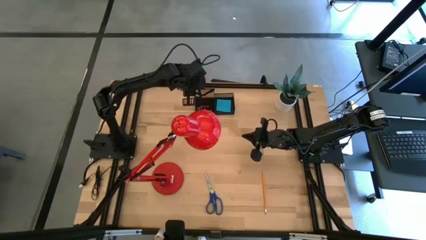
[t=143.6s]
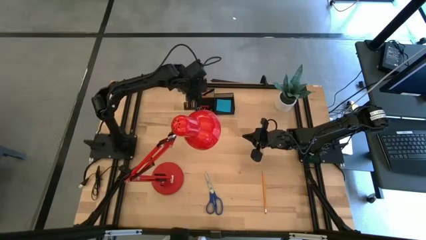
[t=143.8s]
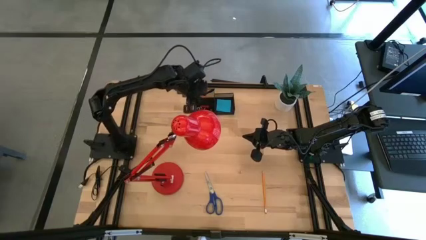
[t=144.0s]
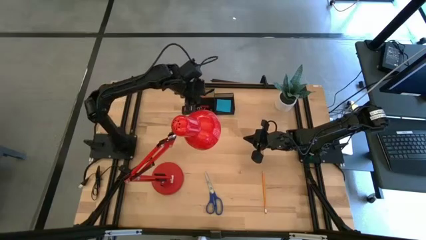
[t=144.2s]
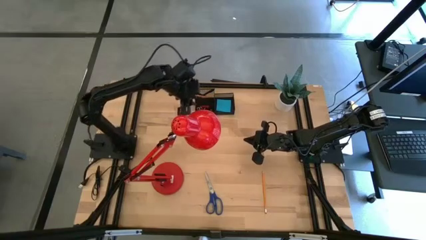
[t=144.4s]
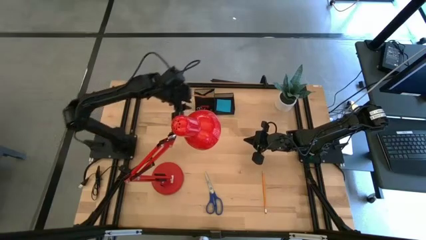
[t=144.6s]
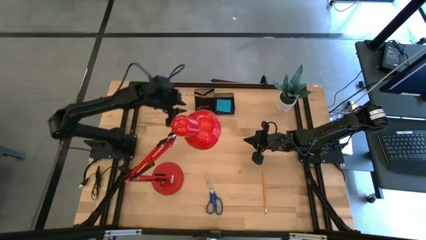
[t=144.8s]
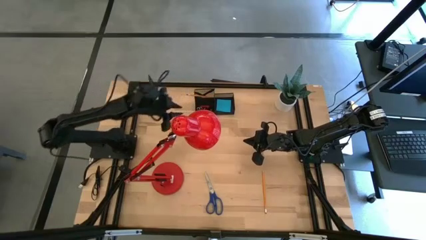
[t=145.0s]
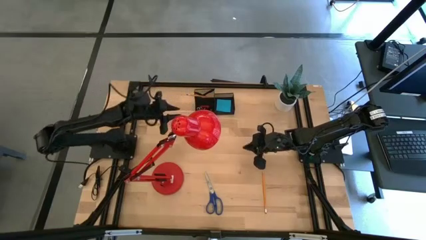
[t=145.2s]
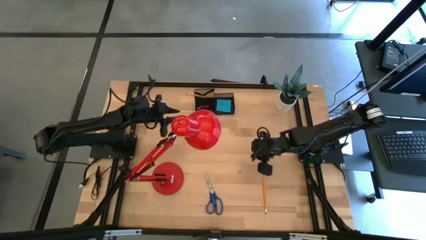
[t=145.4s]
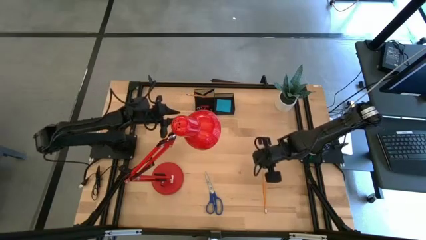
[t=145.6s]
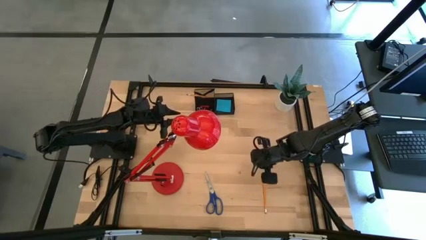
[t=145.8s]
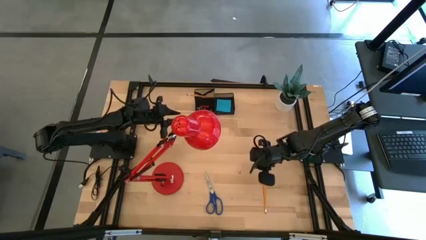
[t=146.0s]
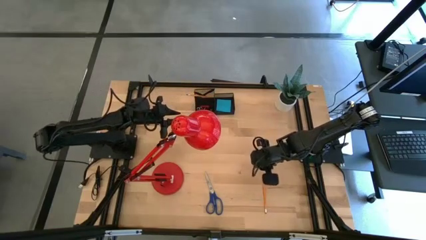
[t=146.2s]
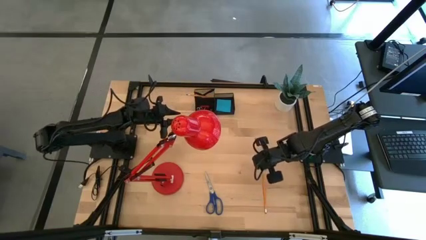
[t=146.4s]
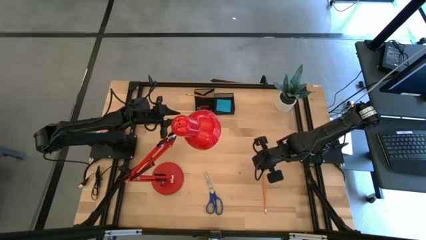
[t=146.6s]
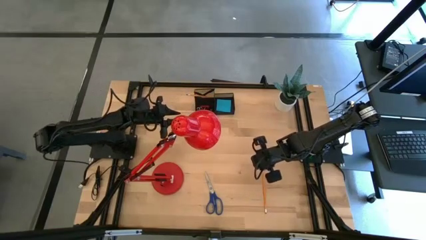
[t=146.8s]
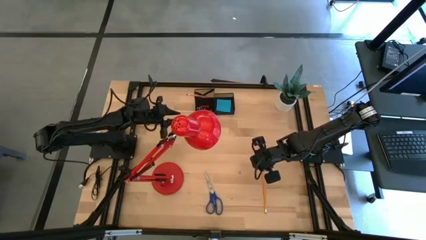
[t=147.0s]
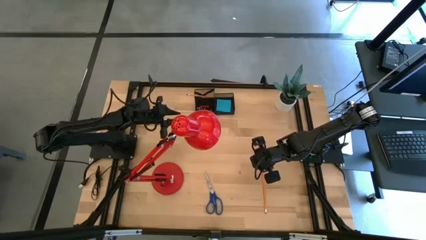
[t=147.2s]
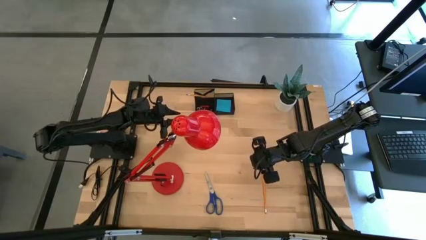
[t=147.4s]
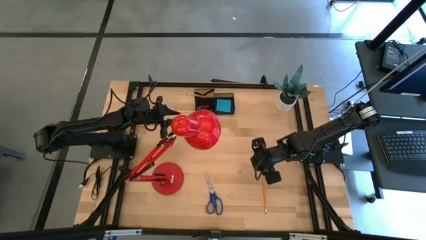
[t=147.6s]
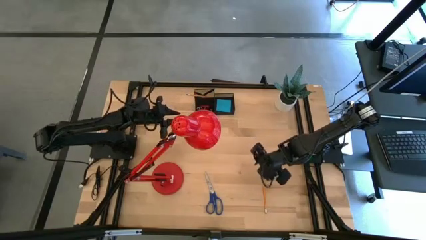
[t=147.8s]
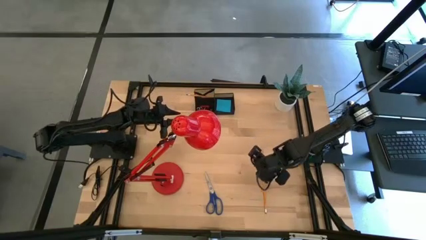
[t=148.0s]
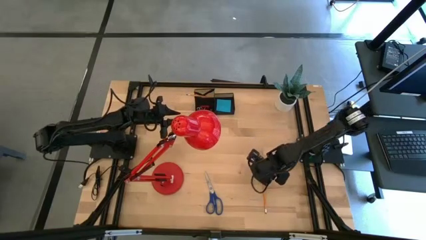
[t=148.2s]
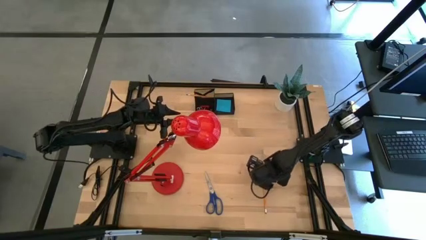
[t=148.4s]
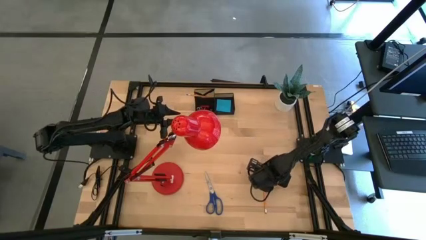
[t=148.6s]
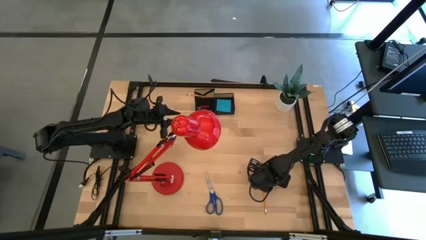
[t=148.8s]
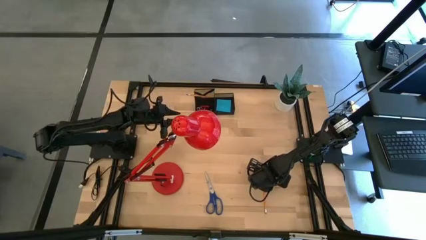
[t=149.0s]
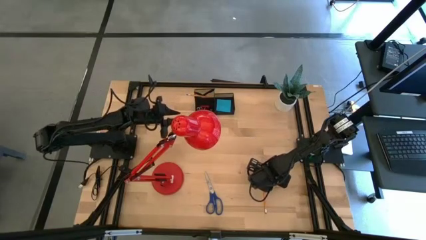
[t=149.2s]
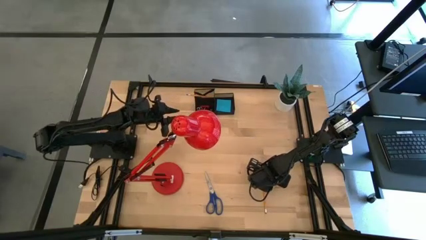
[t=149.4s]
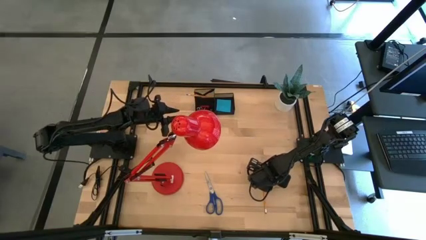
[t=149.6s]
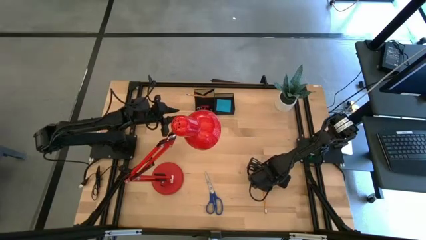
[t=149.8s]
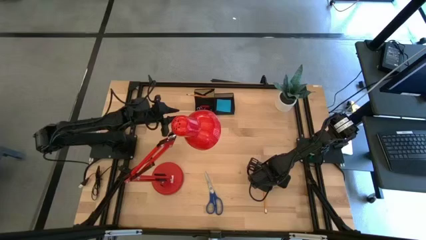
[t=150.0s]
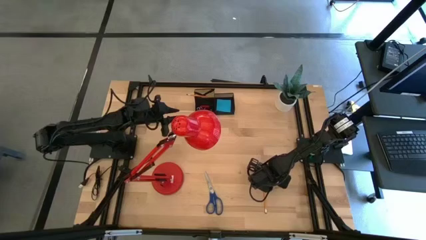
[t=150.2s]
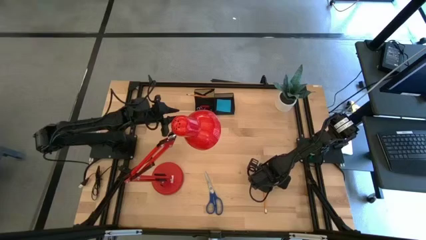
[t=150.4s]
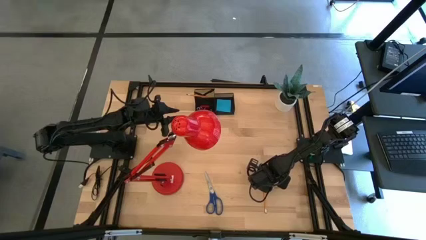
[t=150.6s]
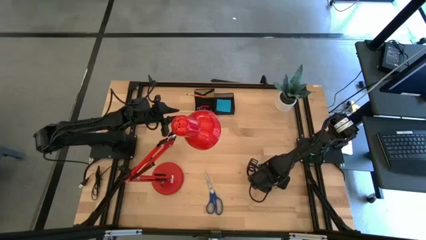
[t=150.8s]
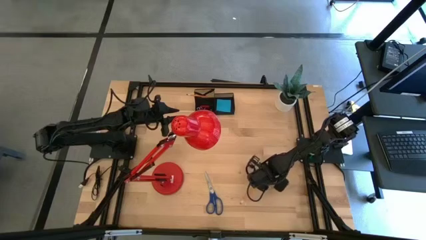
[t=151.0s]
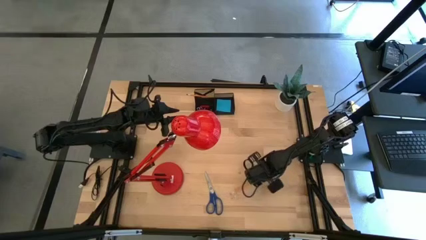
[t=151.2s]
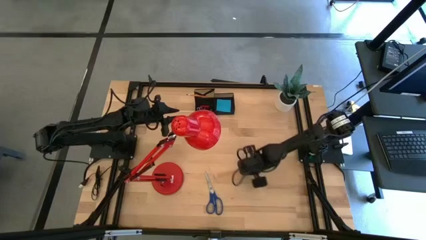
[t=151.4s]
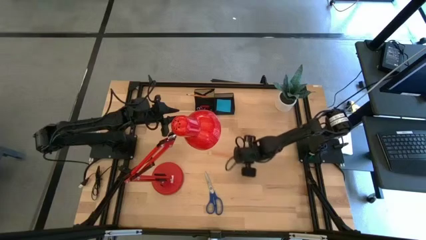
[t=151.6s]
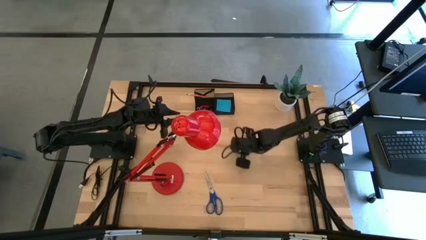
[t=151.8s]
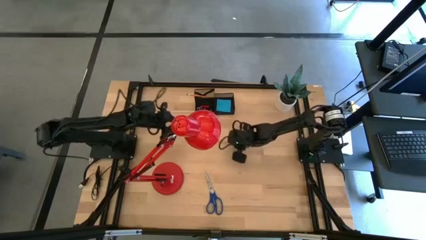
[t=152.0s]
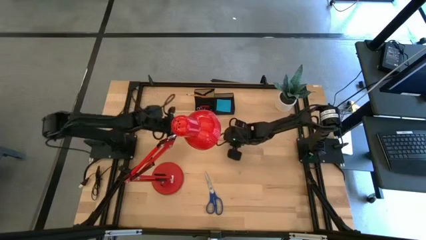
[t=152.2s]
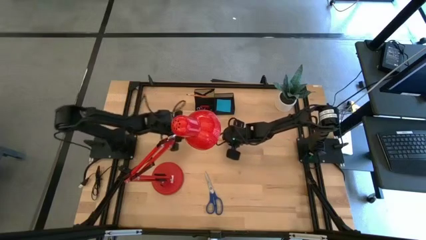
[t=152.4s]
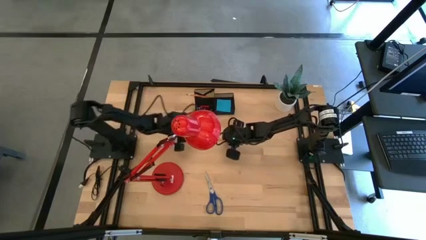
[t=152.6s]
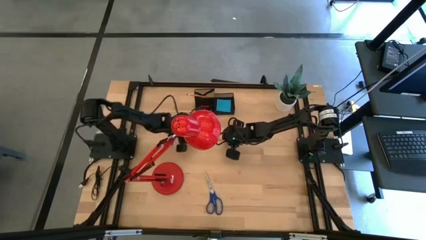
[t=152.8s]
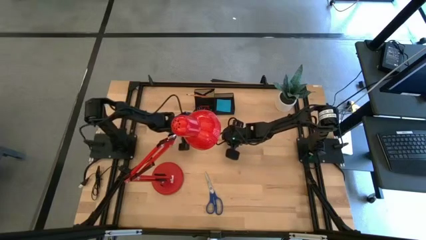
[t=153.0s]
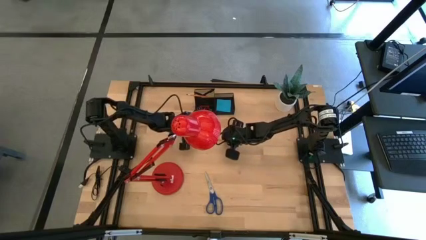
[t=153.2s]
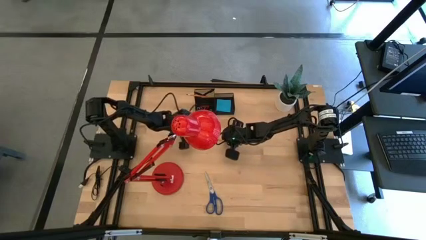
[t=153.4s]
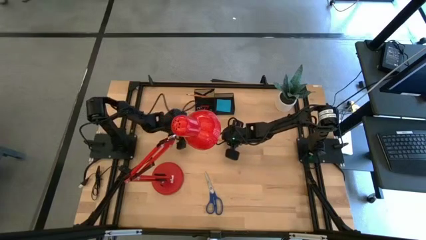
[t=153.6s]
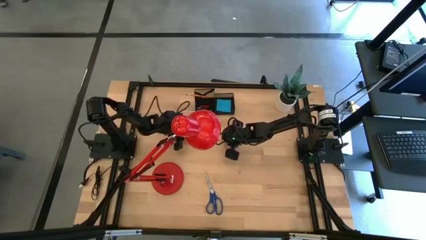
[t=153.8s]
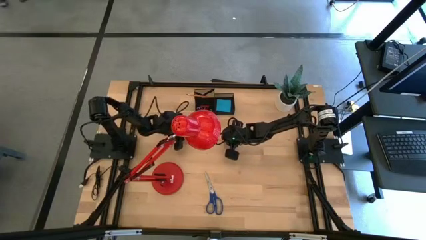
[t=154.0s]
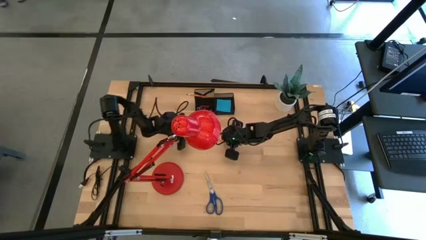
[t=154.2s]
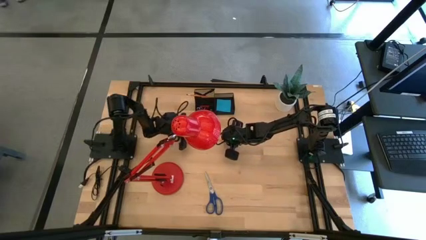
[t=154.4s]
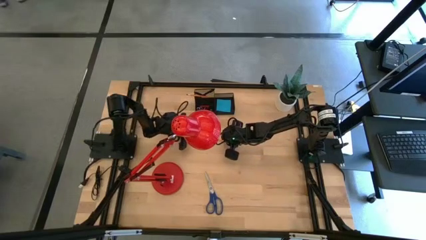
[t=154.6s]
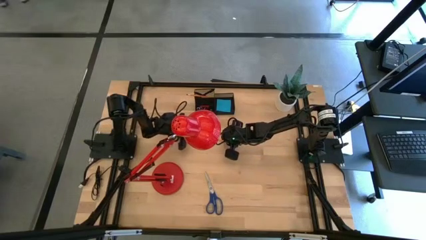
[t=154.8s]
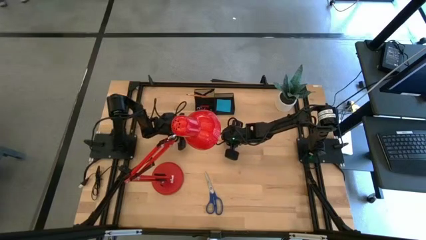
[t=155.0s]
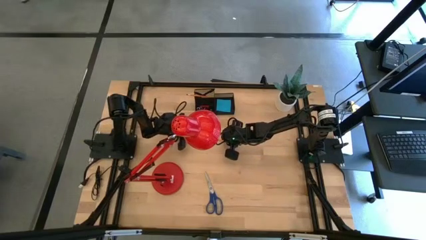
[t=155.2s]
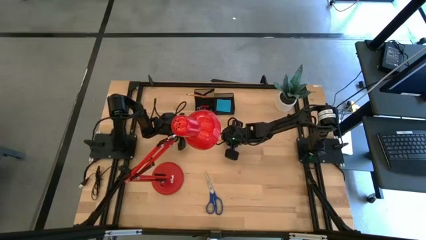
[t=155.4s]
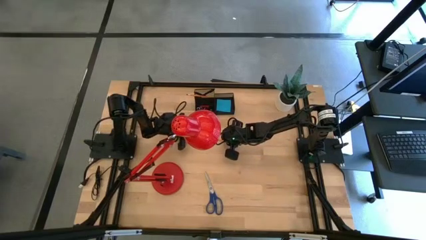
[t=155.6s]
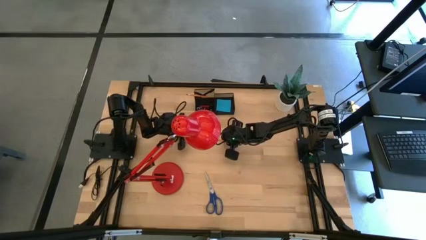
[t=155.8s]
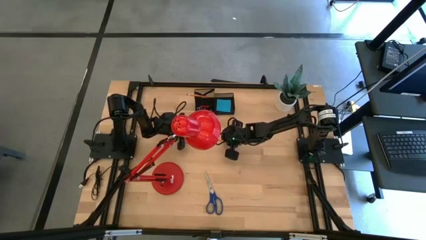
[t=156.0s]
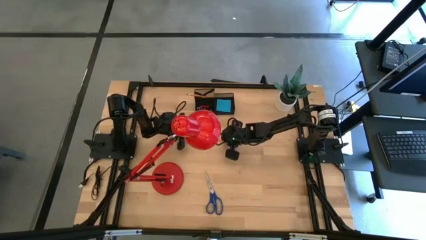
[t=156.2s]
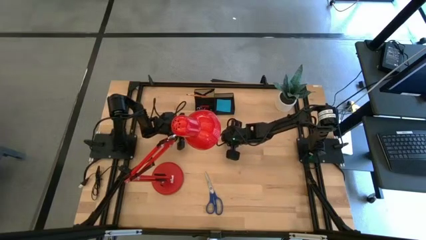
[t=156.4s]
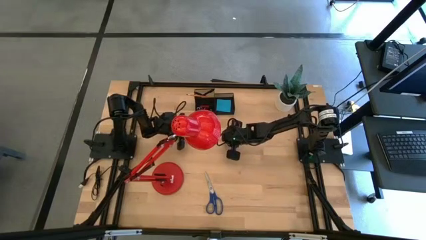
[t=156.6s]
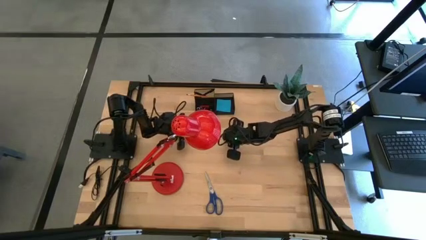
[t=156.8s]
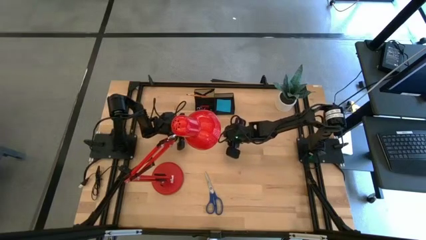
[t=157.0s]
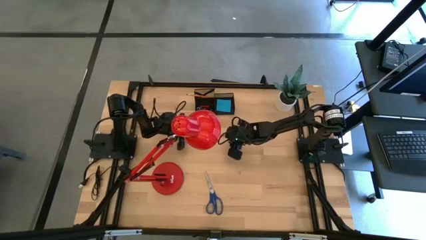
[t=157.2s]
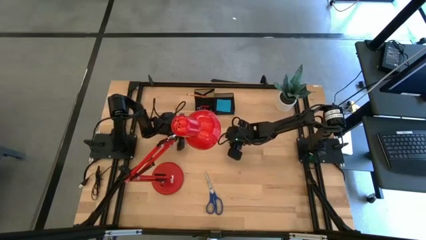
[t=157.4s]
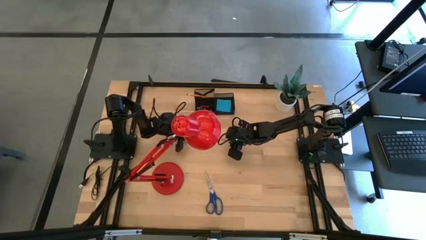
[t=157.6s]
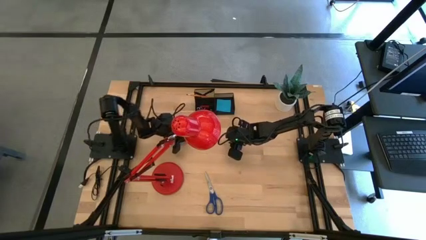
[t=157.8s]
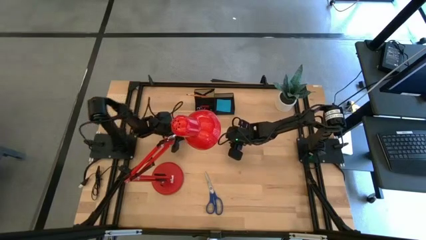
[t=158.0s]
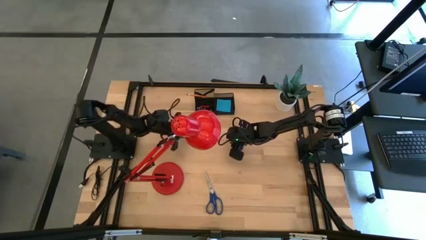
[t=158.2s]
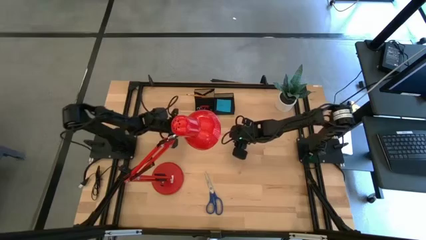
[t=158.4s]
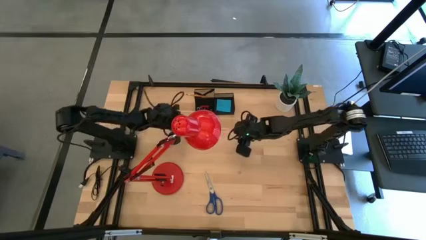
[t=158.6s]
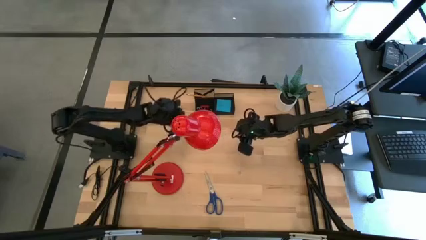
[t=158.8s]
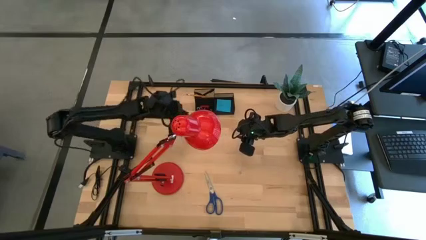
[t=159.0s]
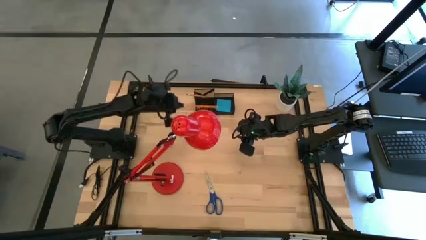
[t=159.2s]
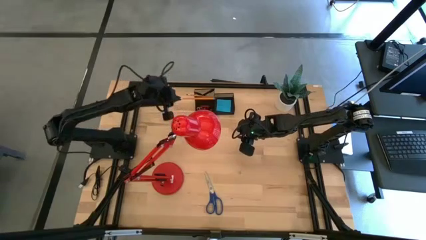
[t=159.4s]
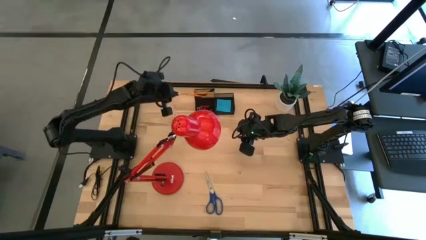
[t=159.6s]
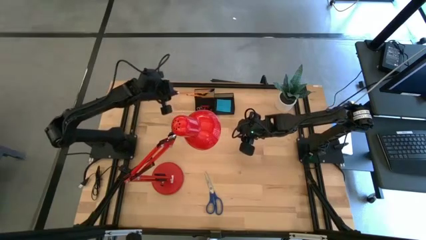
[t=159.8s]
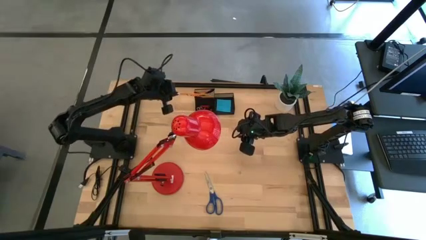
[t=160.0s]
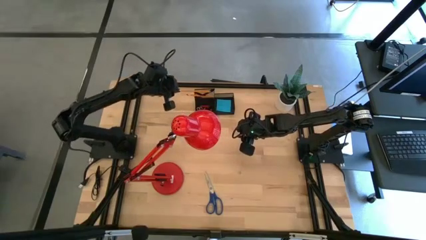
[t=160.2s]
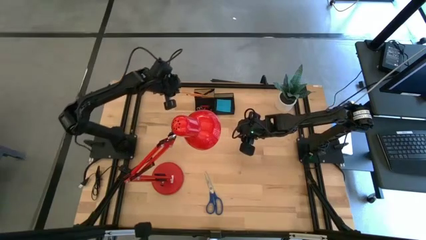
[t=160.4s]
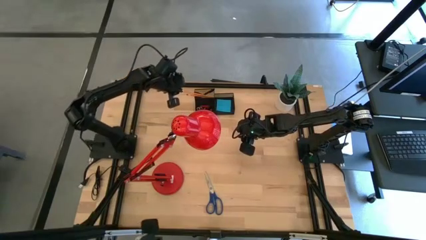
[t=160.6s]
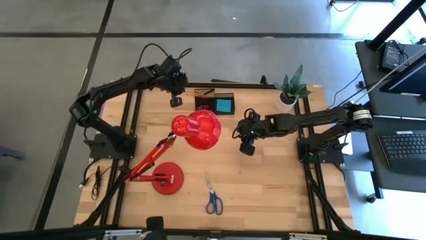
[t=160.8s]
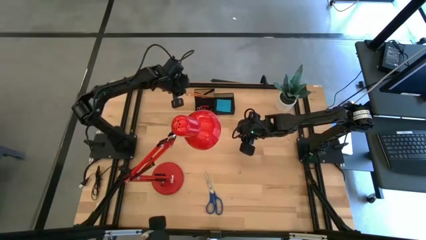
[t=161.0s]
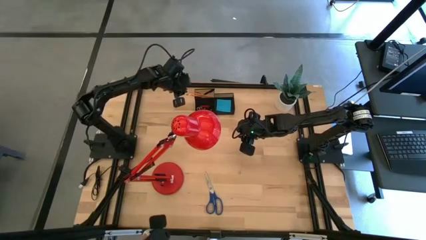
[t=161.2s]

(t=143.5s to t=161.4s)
Task: Pick and place office supplies into organizer
Put the pencil into the desk organizer
